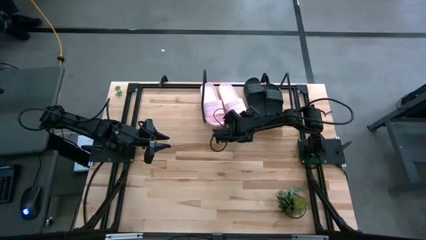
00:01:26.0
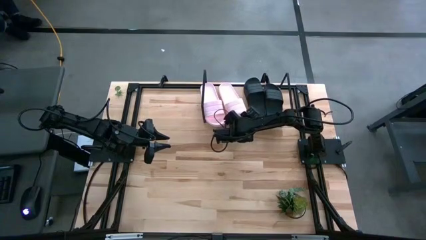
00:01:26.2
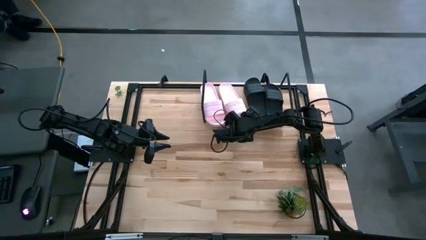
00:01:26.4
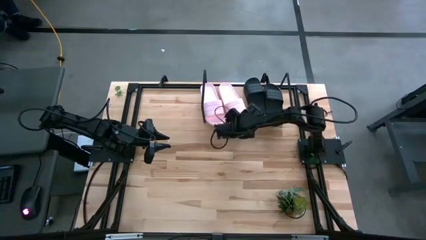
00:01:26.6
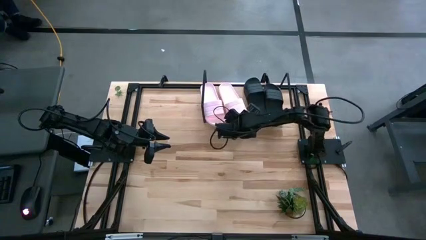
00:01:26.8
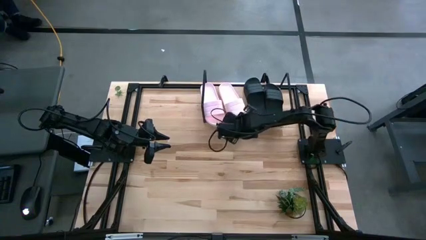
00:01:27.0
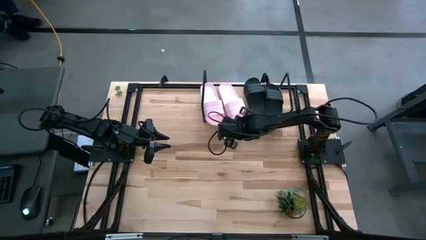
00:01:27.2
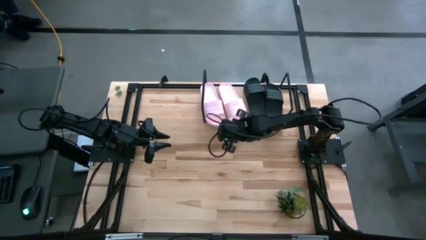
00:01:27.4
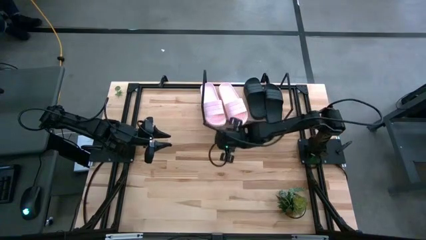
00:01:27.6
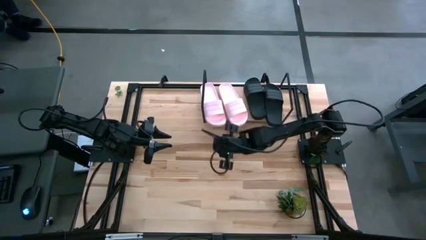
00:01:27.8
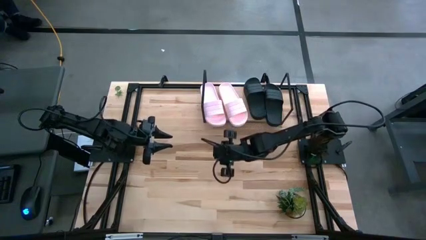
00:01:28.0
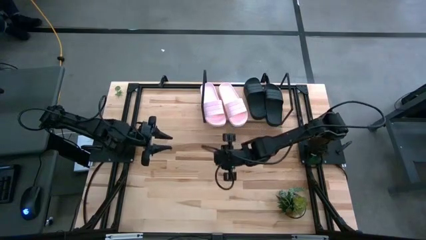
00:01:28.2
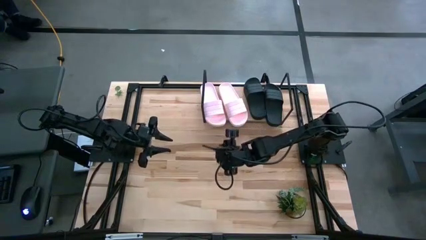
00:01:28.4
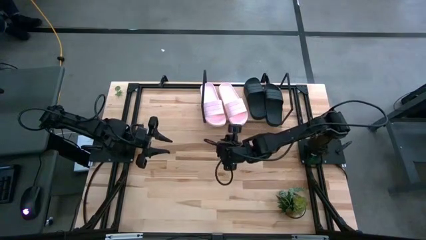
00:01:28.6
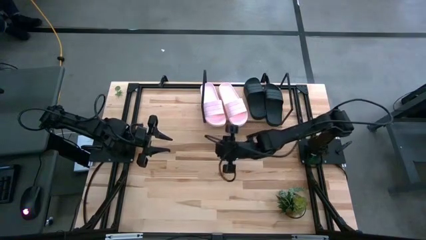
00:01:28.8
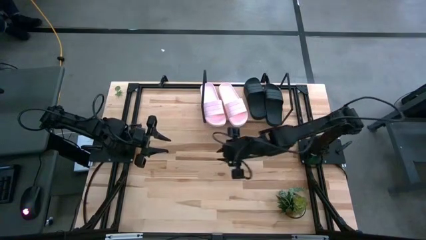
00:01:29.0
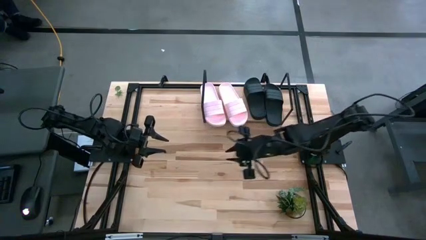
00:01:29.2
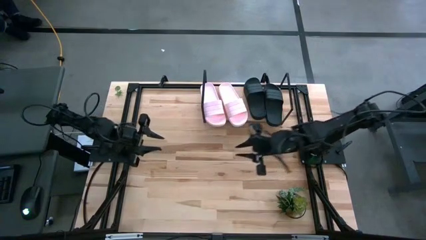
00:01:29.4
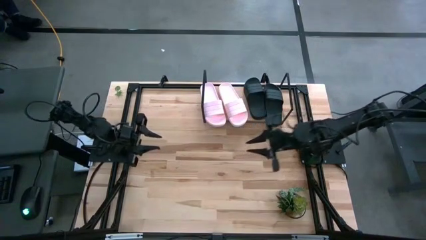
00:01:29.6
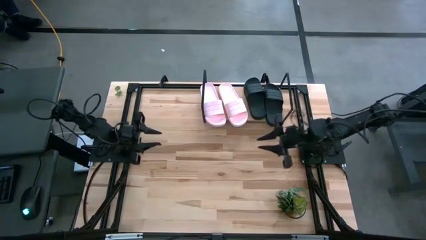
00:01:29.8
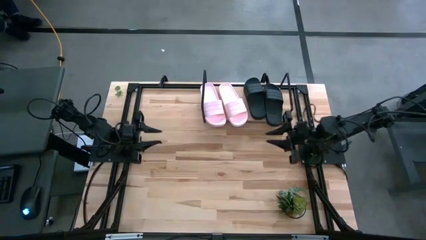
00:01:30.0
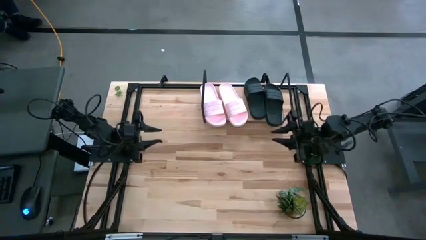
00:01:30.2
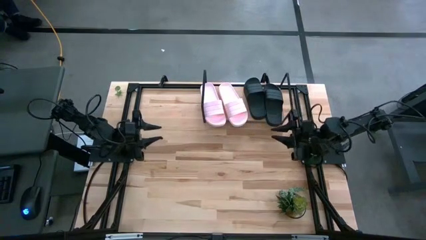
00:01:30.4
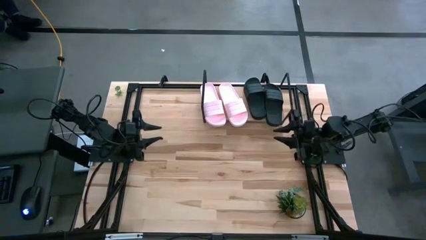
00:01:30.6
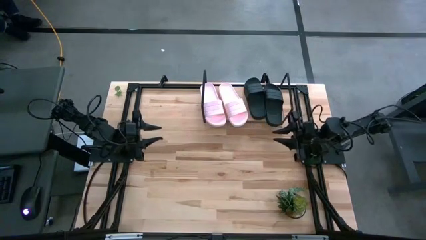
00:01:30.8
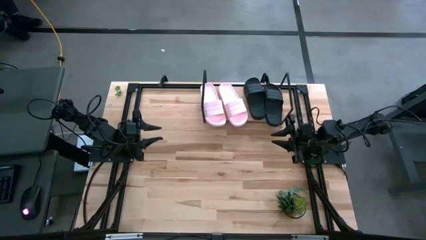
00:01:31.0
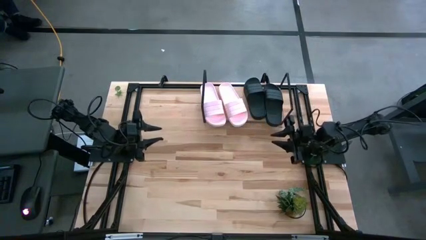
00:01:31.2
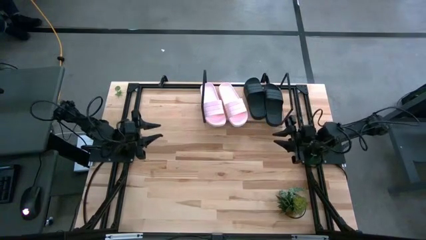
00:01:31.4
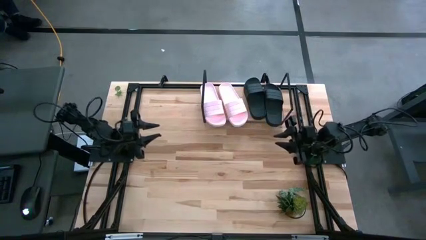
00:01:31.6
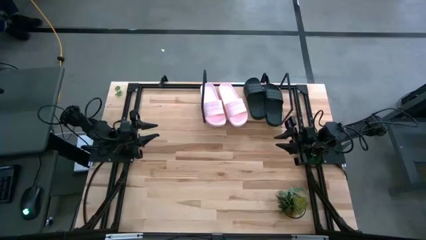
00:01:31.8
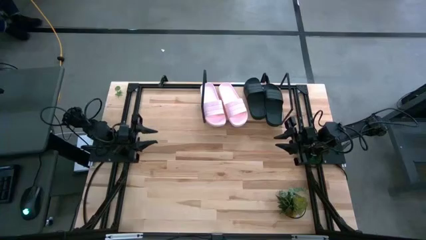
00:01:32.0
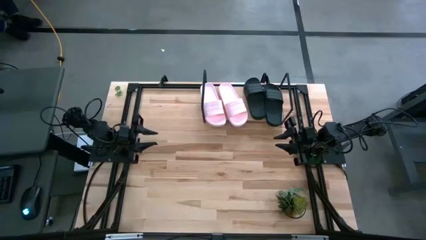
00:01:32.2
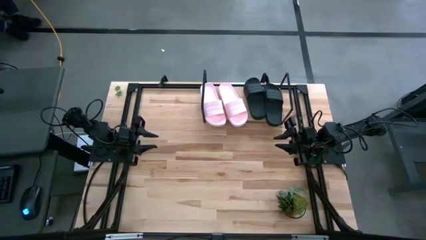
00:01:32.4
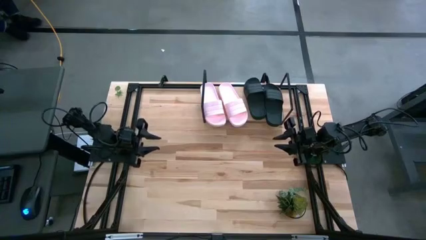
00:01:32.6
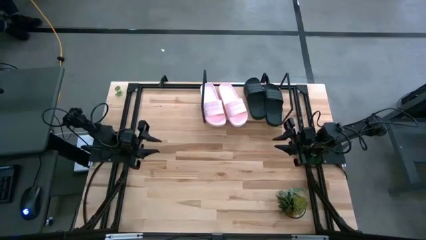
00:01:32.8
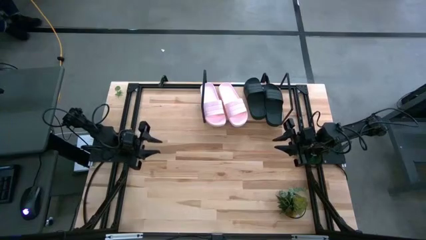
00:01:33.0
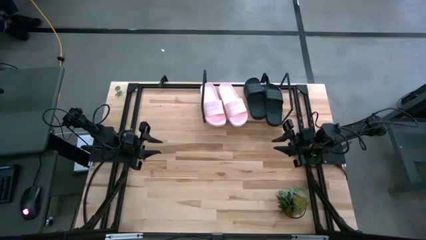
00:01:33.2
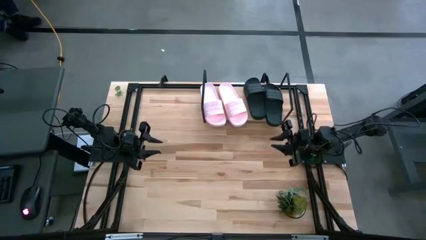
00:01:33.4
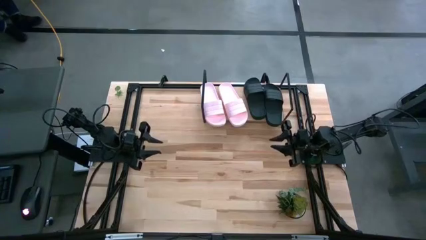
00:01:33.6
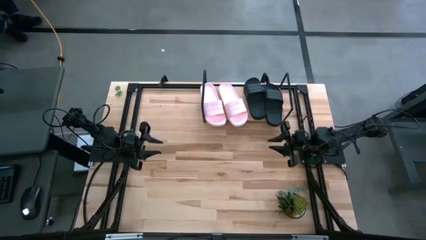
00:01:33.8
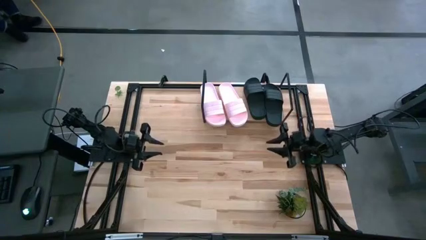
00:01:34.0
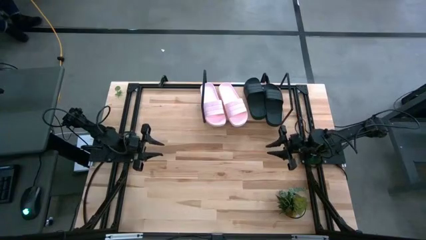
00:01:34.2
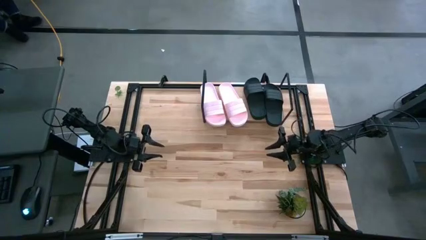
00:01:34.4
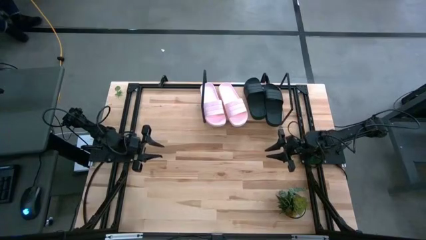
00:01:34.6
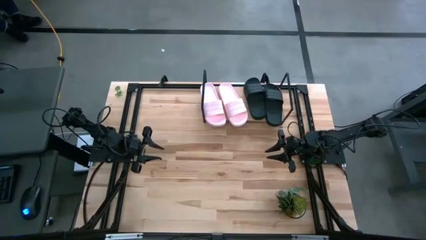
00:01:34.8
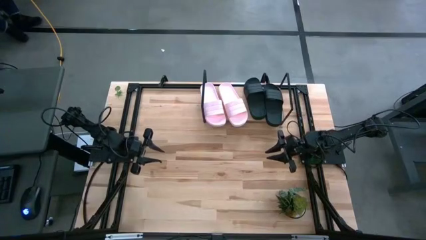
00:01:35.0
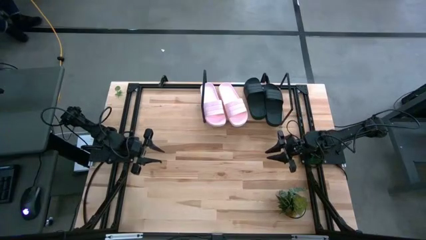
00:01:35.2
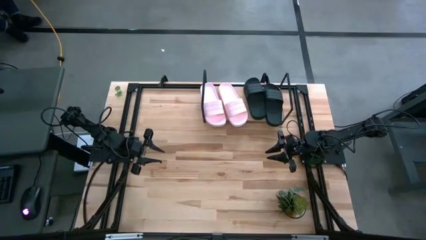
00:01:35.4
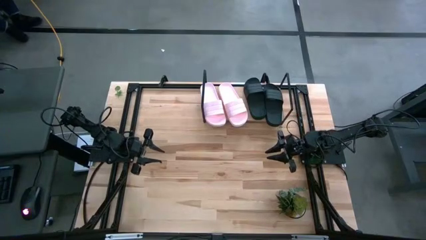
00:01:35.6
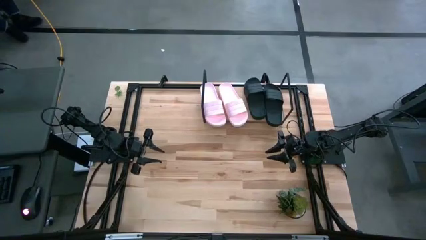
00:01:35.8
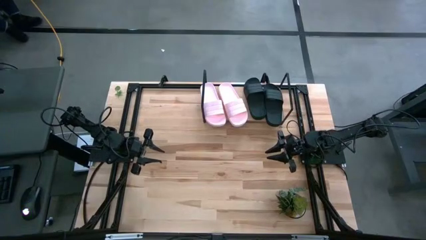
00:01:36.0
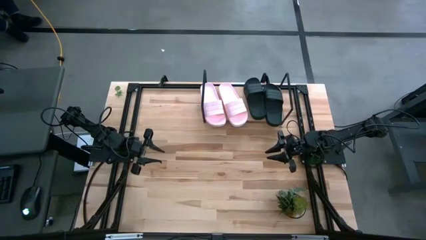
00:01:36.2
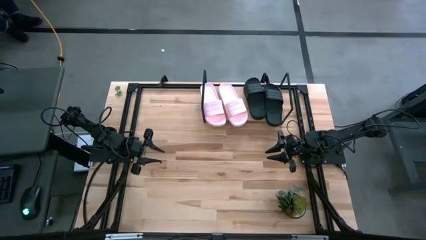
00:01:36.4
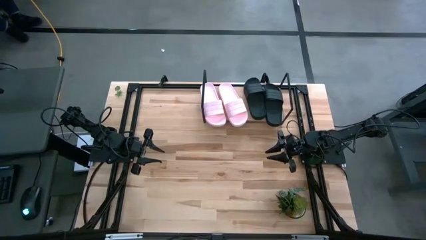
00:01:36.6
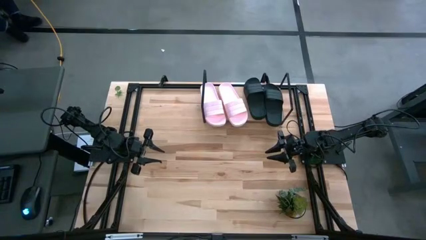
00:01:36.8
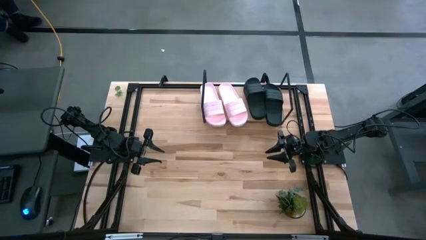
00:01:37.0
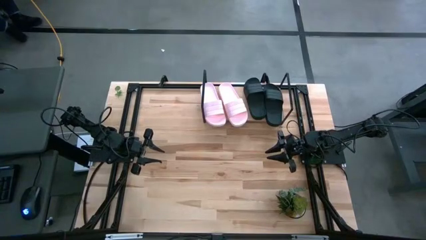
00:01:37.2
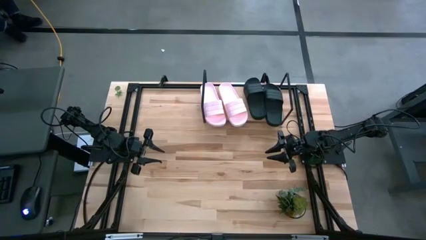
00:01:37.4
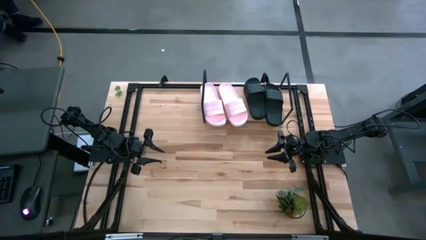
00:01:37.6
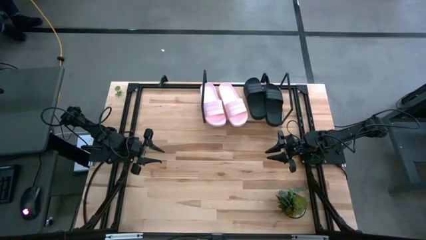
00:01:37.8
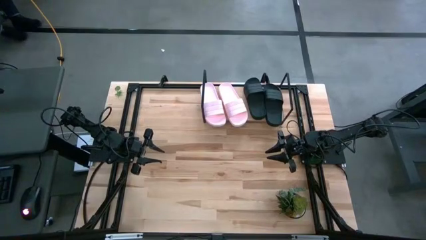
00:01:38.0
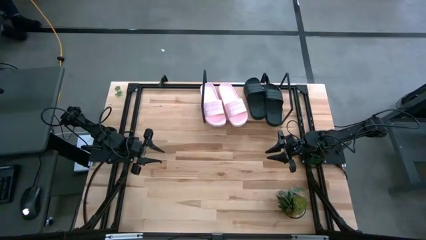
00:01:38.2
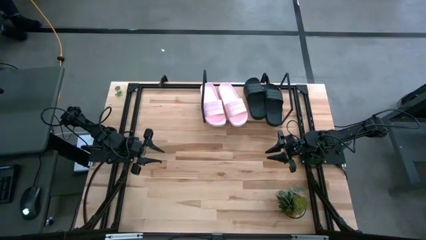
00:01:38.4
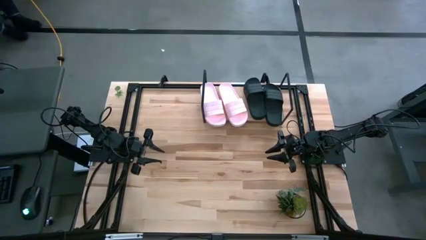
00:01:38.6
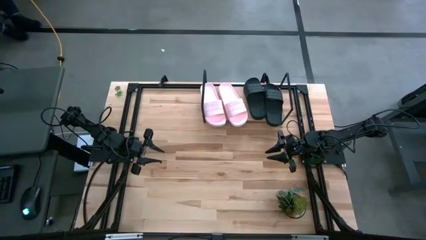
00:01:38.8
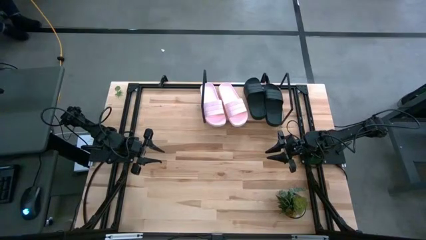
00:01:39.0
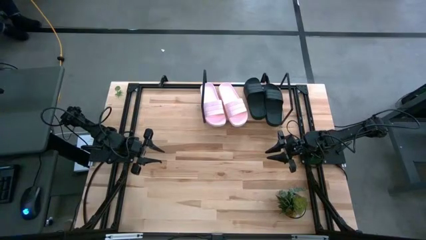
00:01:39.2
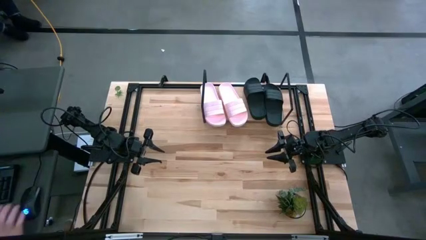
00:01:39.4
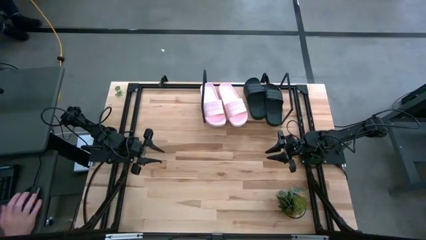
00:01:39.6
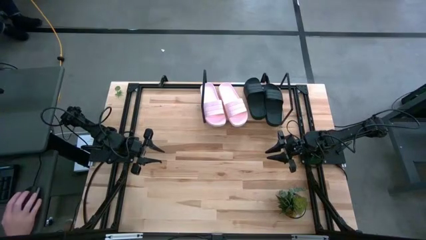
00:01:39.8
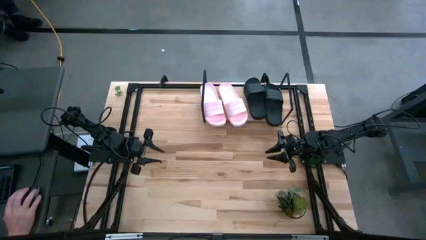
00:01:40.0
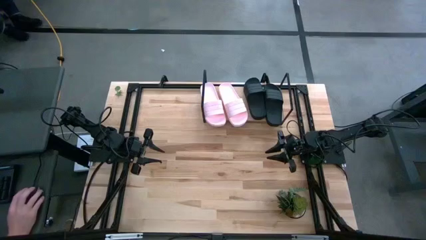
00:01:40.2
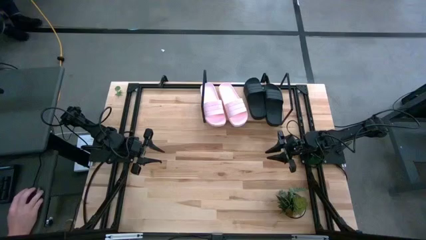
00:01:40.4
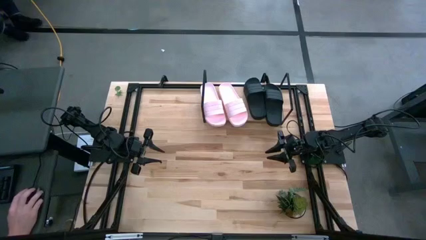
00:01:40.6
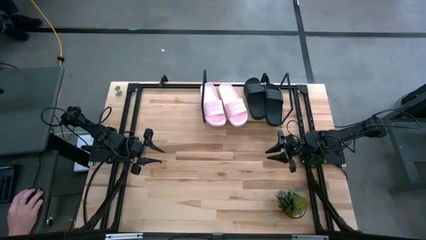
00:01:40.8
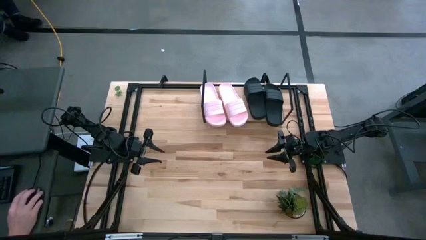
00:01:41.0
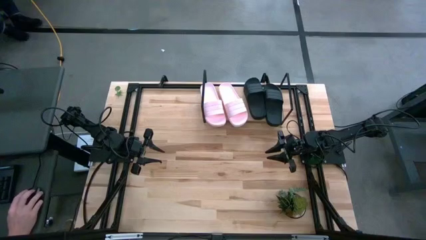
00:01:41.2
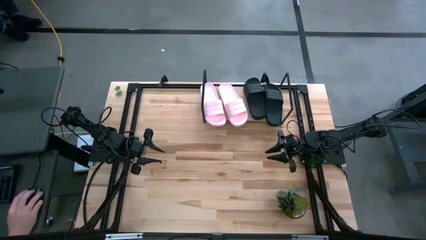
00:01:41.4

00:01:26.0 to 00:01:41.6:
Task: Pick and place slides into the shelf
Return to Home Position
